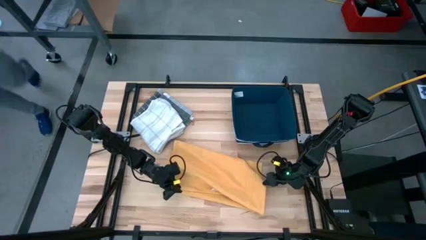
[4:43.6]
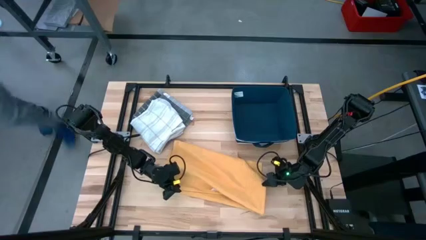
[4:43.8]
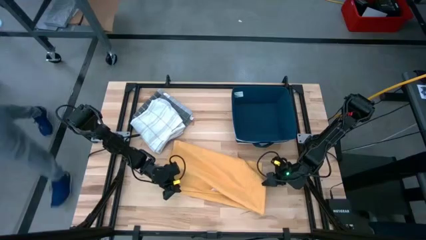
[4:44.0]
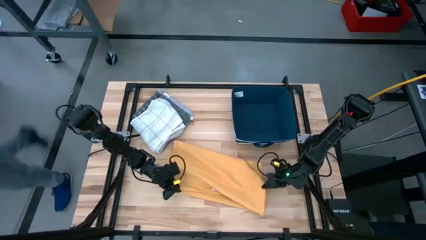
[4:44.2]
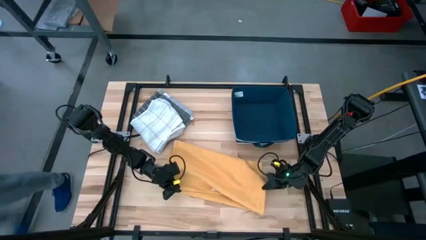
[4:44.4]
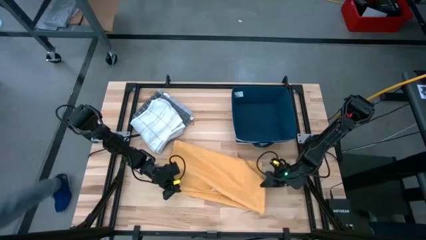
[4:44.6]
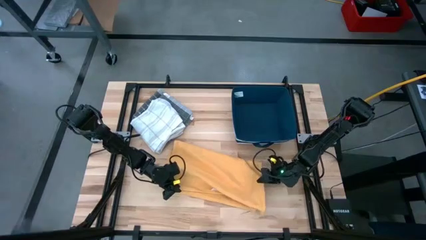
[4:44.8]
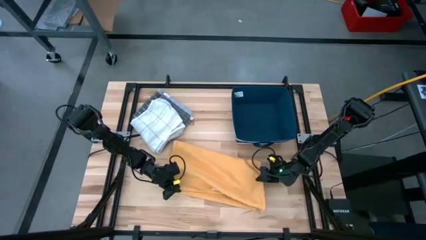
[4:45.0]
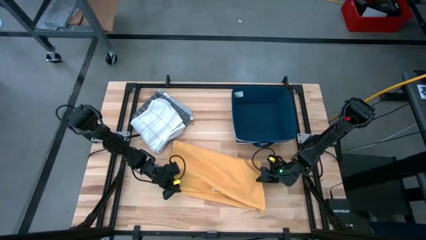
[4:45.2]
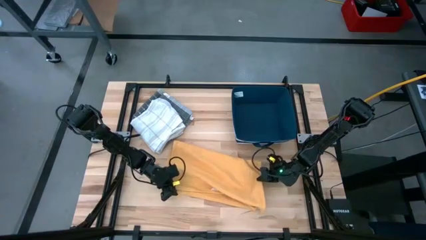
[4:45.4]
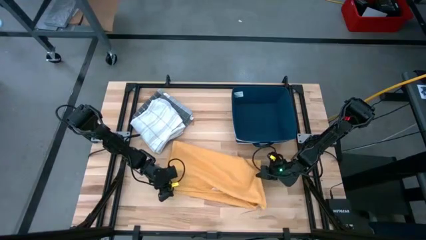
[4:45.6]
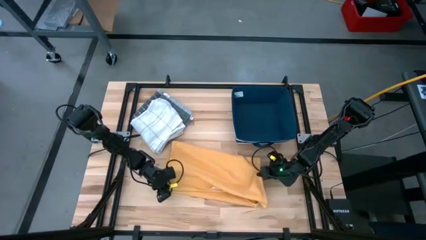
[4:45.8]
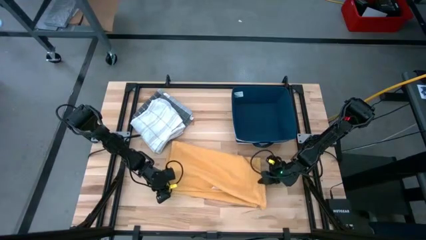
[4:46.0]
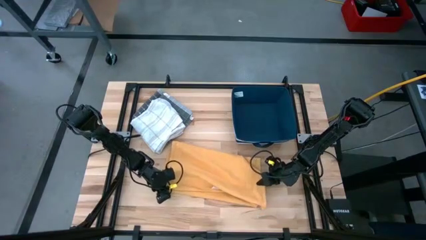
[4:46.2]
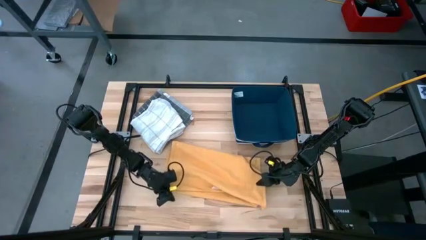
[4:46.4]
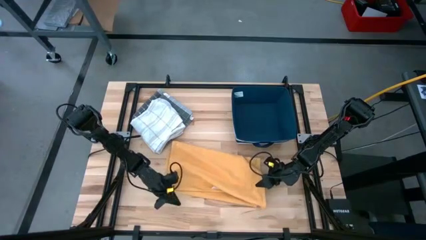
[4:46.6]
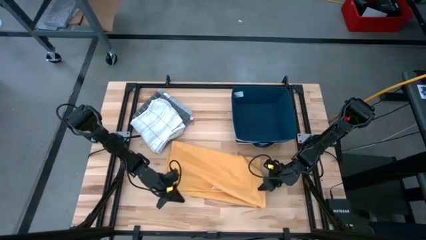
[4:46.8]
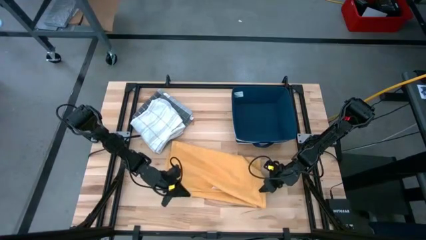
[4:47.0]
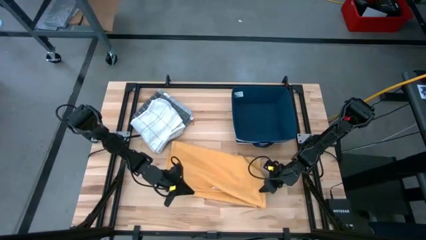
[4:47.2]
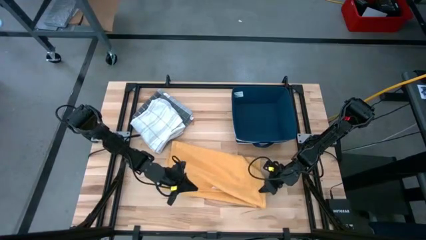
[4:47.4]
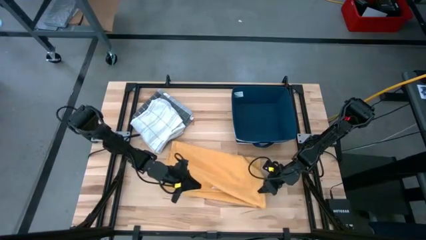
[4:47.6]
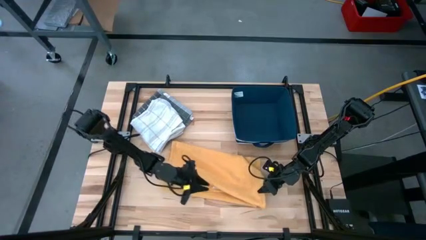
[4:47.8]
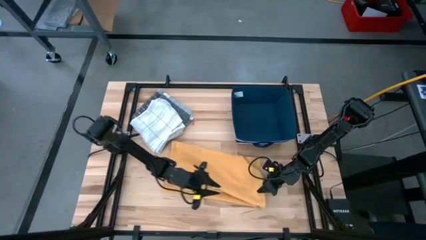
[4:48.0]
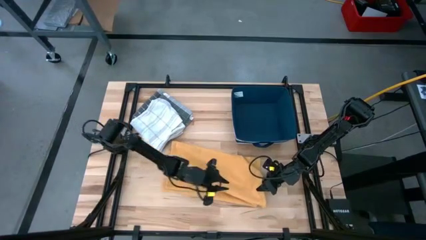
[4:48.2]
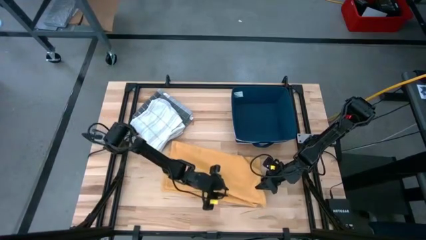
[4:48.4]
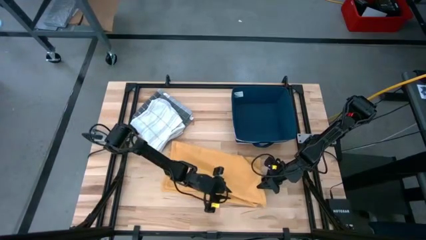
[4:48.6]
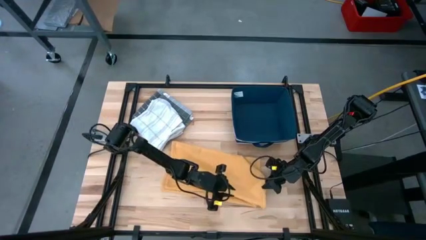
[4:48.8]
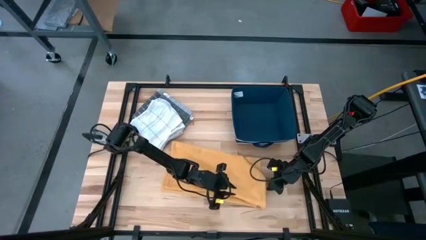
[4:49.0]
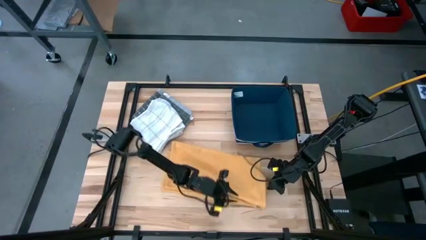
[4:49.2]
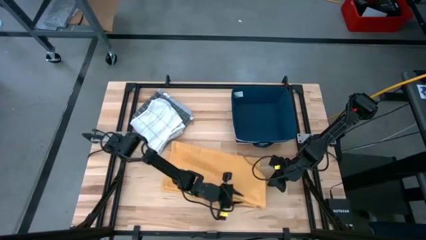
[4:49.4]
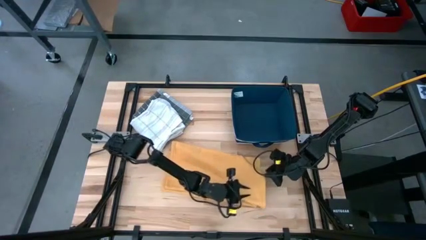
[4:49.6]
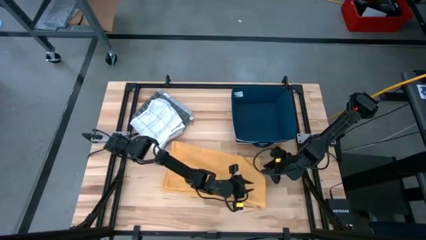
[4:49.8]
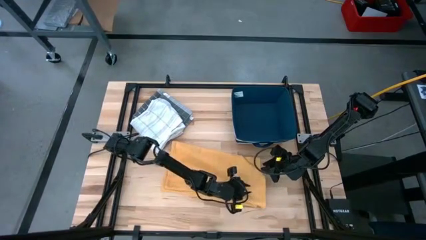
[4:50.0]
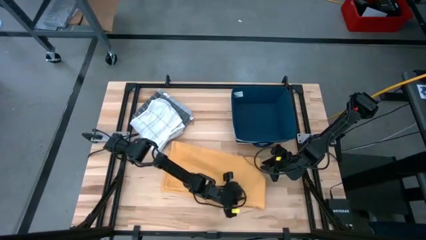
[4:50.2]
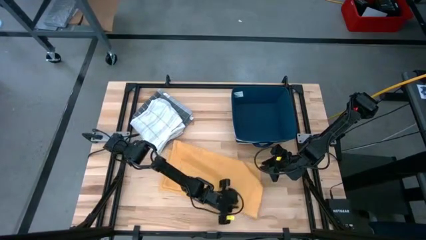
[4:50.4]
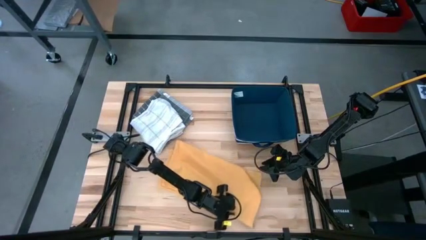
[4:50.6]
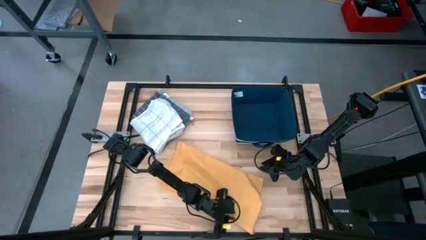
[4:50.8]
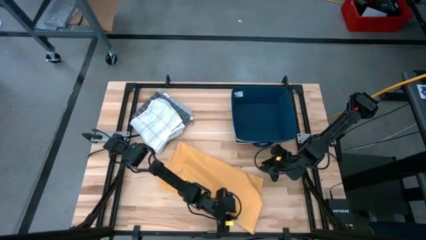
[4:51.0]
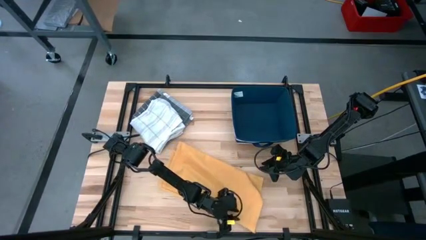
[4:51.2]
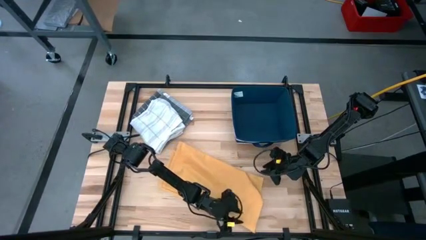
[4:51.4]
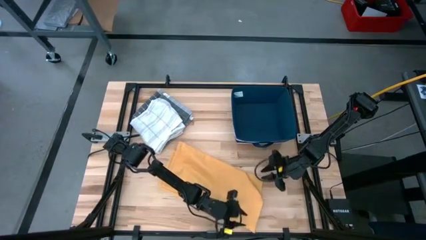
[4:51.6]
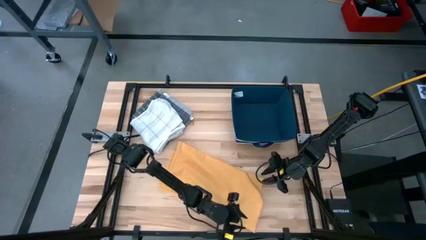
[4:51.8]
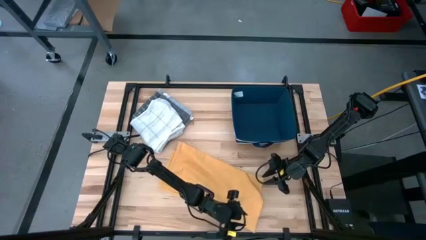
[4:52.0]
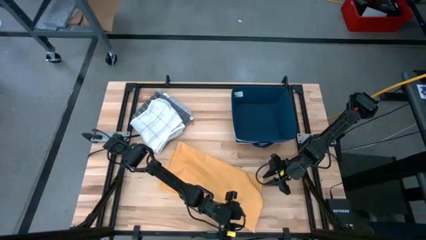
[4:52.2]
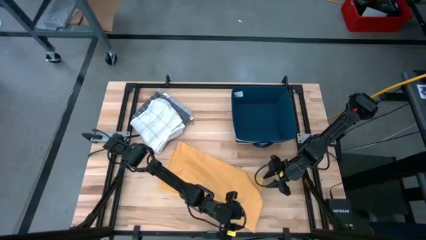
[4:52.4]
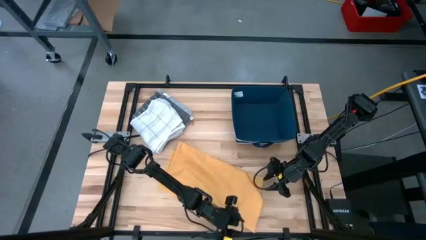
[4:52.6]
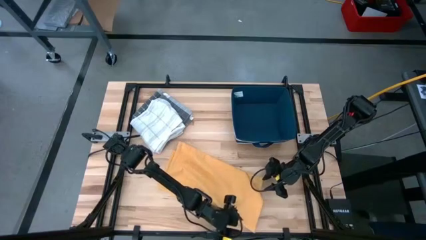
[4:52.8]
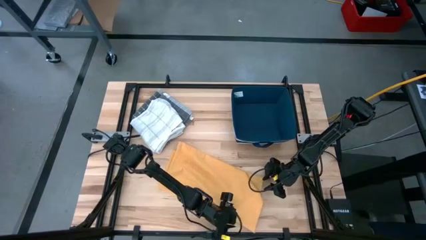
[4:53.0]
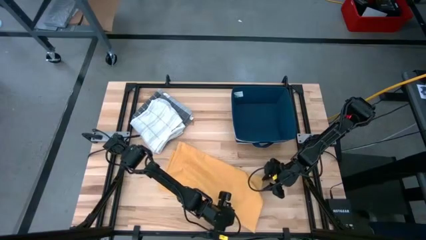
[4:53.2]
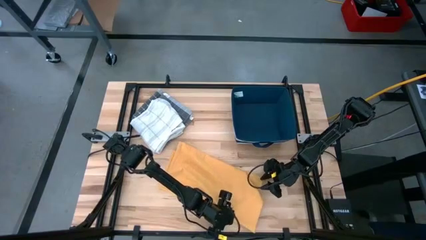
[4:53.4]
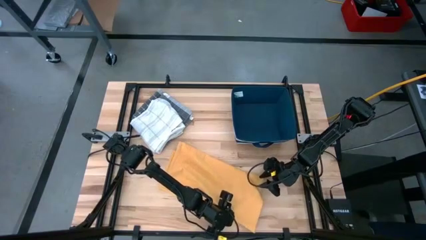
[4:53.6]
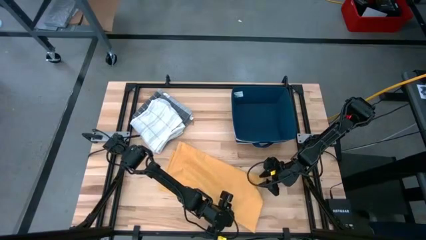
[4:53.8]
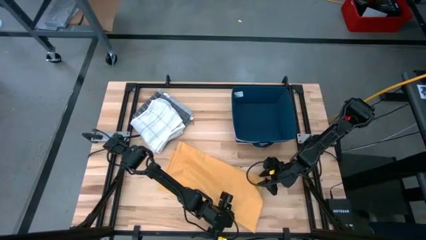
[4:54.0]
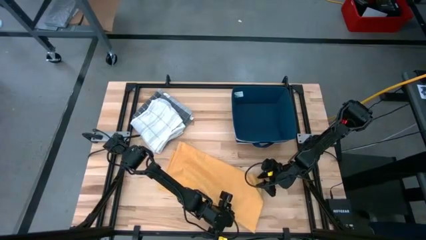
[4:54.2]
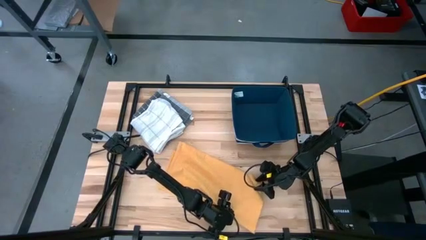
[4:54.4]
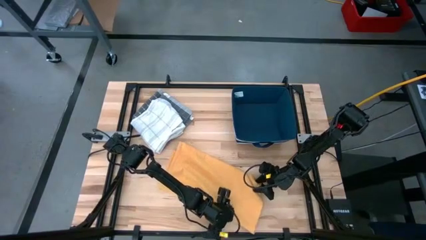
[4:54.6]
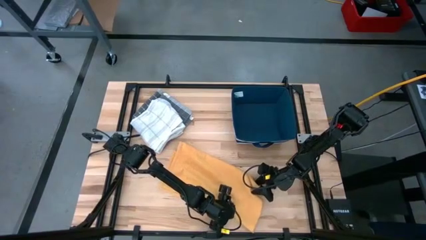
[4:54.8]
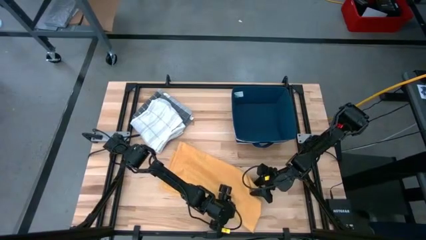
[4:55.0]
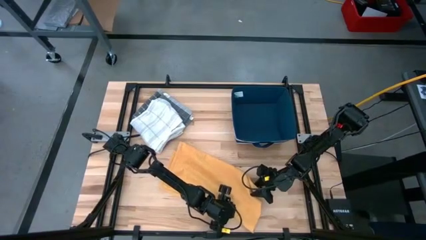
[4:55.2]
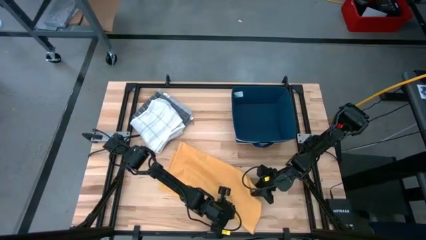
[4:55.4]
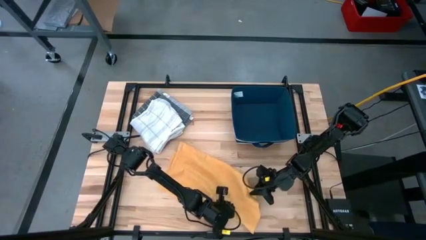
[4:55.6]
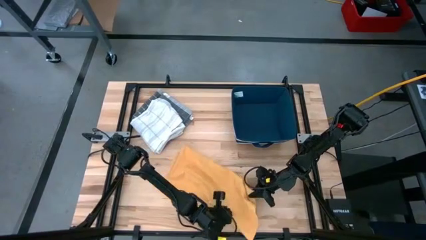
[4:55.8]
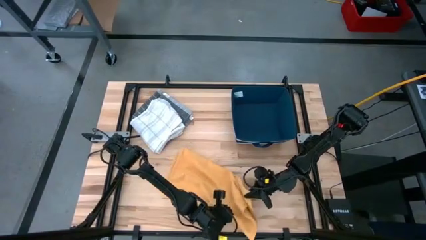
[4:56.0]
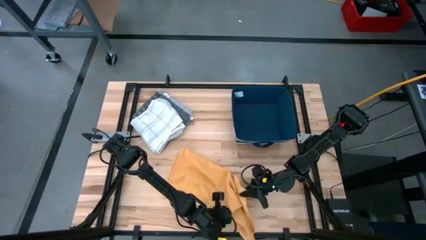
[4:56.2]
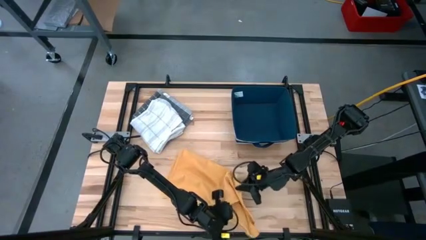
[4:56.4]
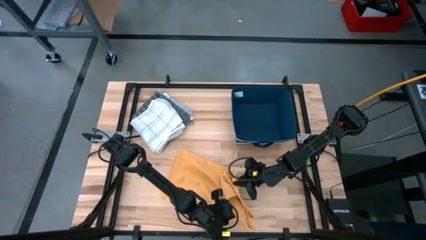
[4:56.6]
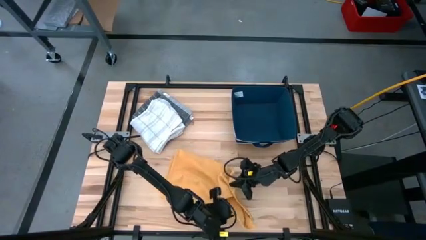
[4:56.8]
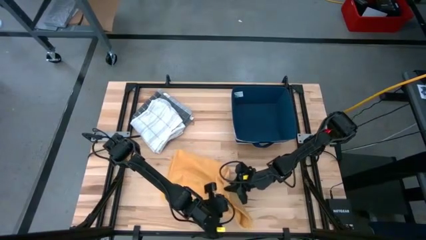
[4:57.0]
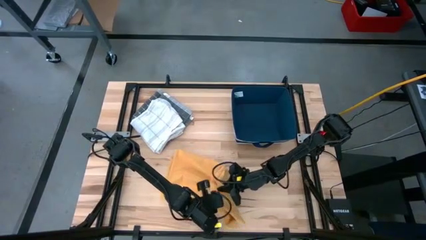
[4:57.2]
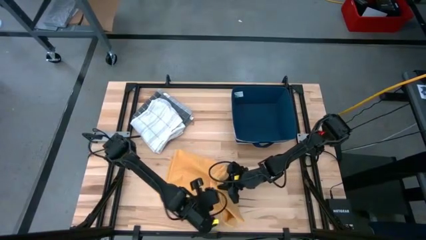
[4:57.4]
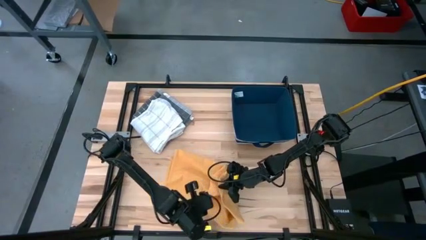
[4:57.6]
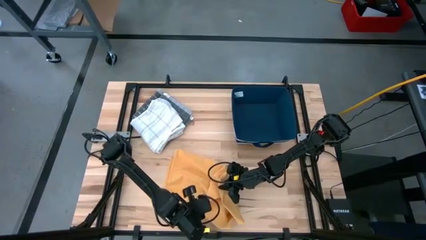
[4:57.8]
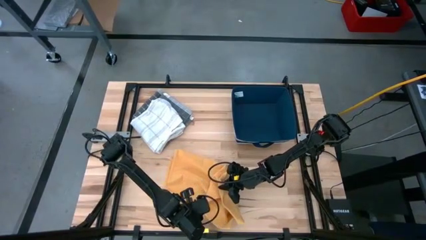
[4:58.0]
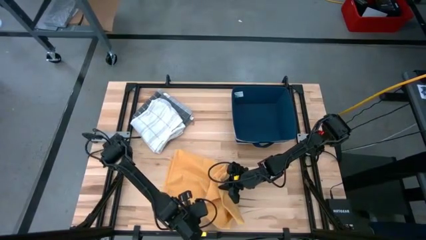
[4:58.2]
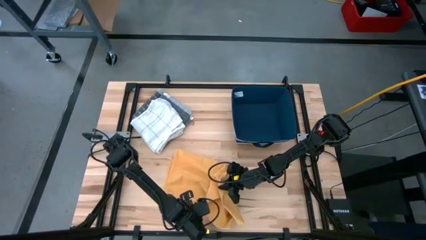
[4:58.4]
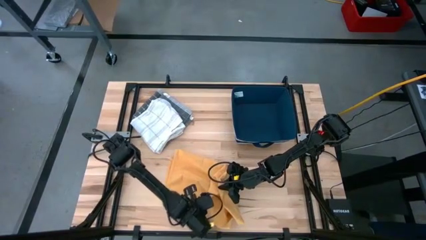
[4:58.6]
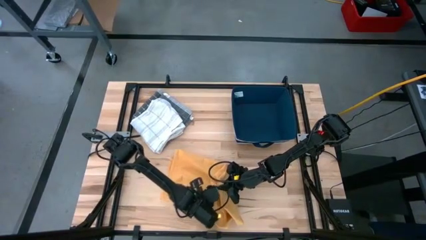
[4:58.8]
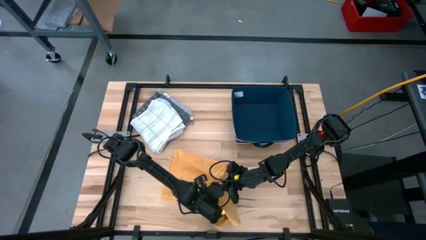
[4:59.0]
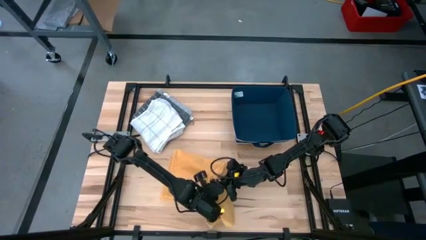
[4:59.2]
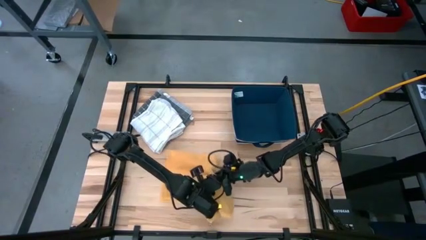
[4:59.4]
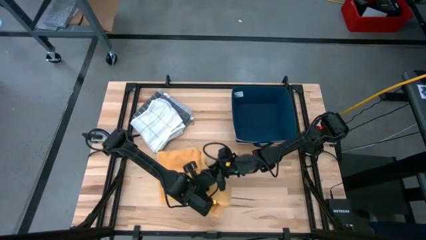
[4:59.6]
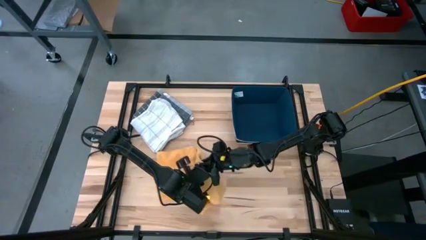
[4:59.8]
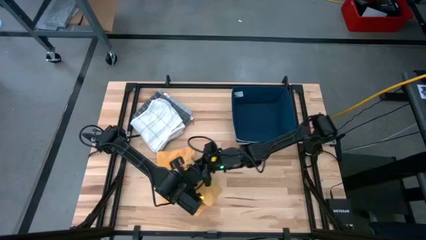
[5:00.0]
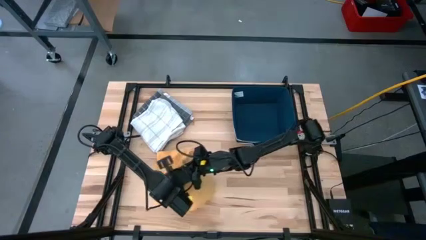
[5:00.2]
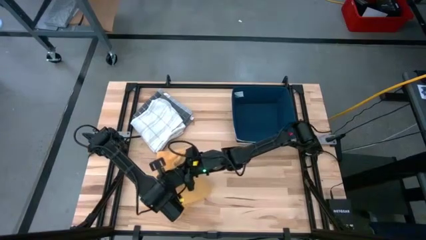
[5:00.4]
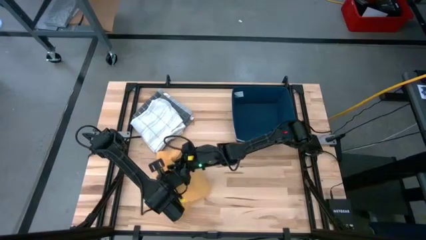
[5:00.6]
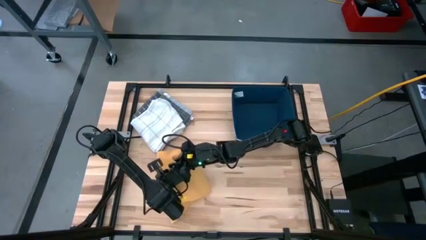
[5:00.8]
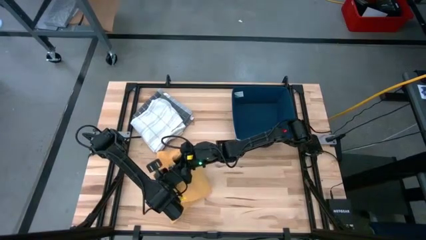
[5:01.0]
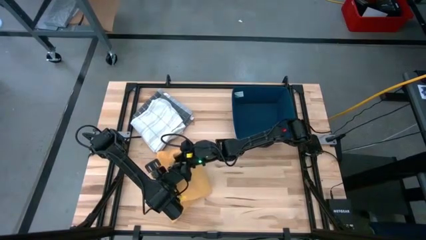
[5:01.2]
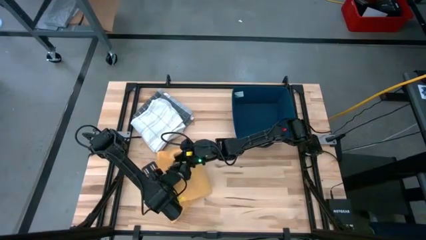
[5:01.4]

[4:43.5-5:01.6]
Task: Fold towel
Fold the yellow towel
